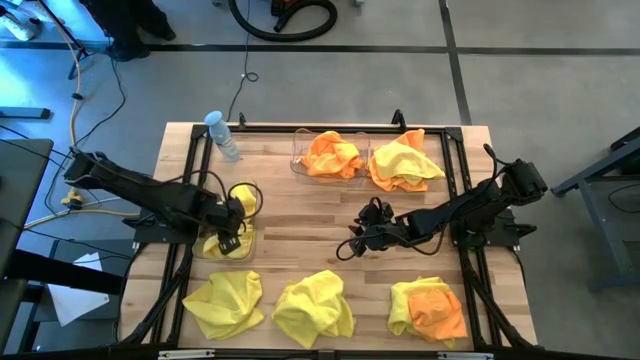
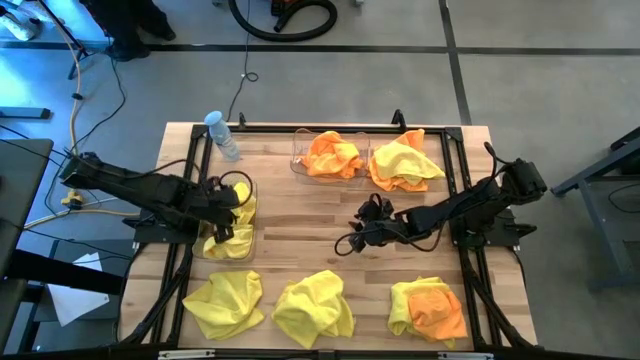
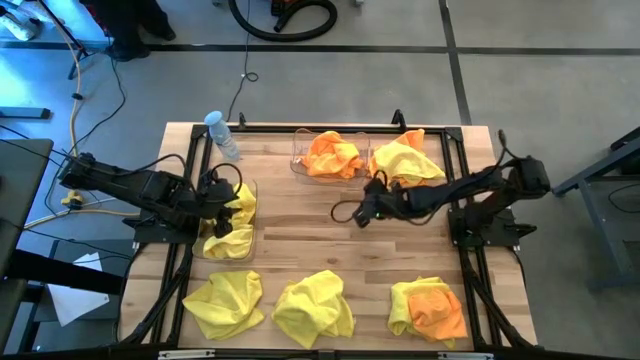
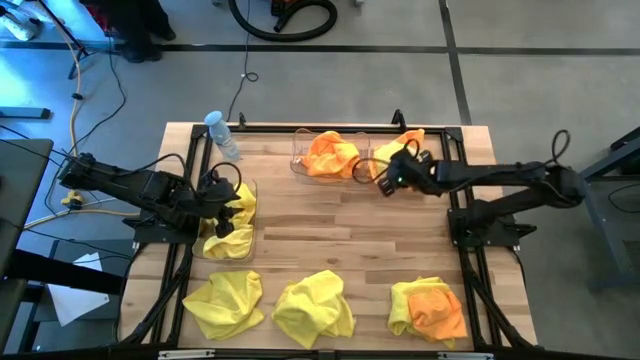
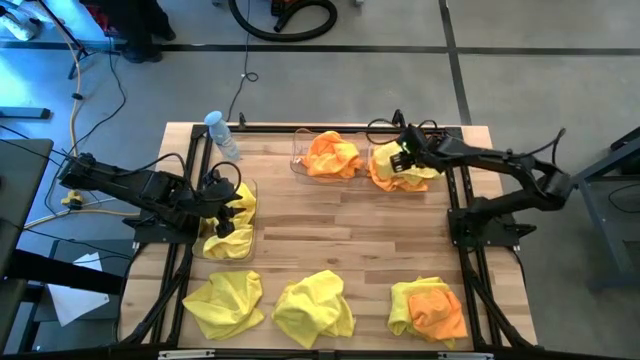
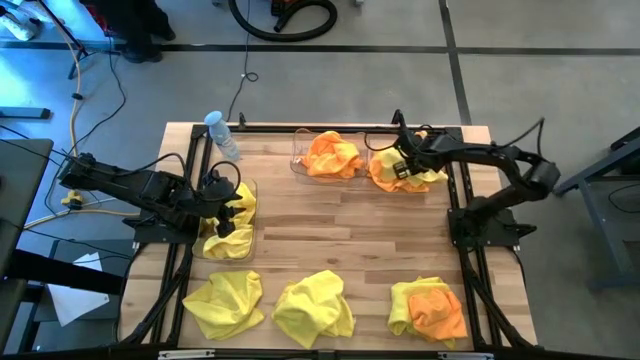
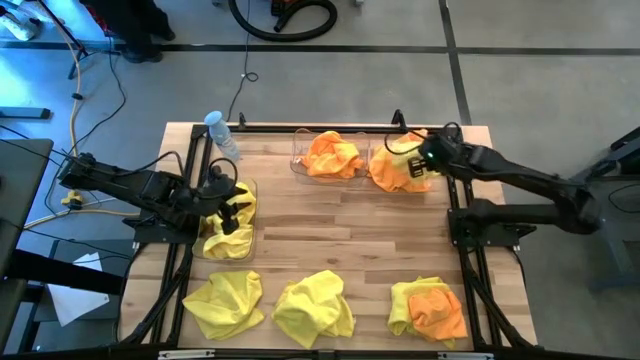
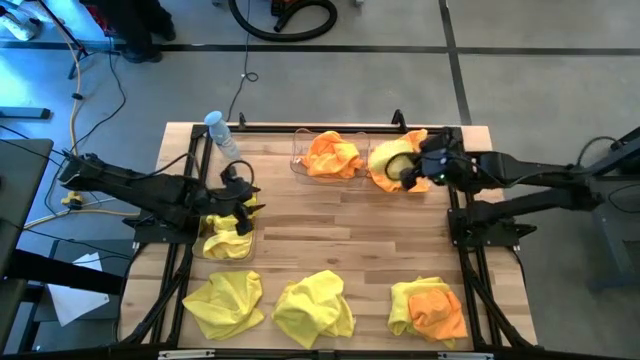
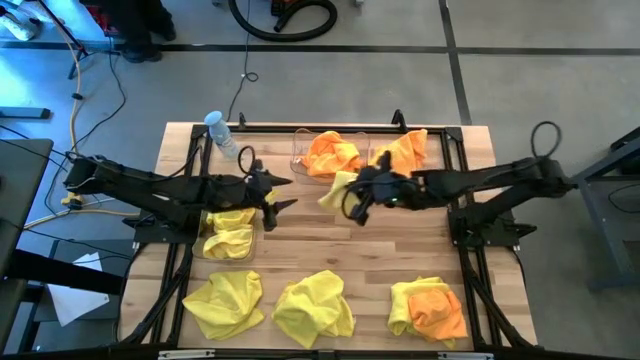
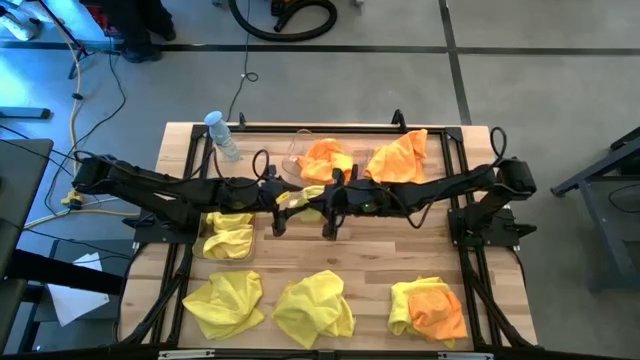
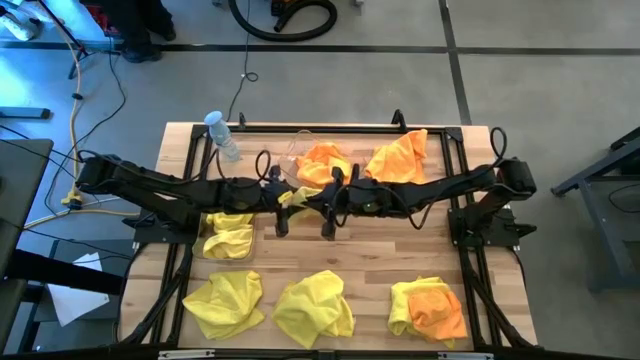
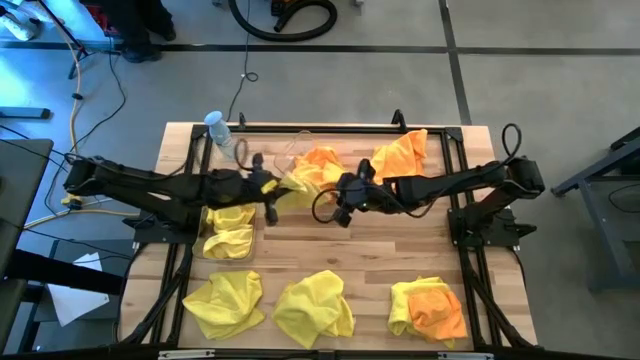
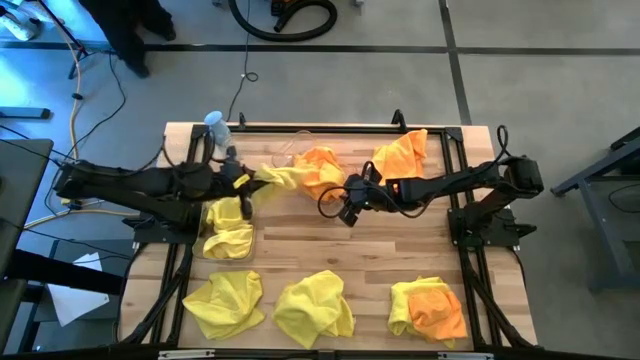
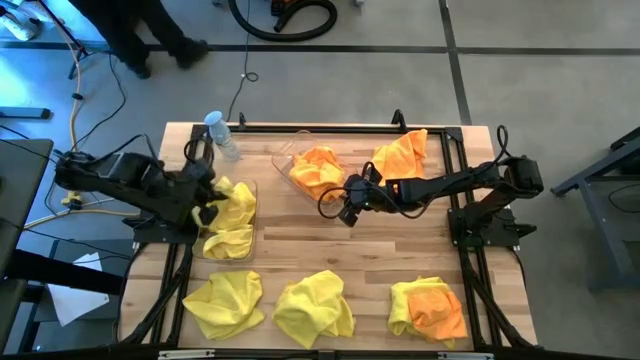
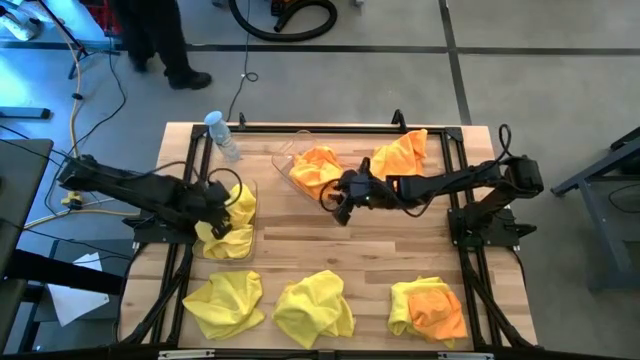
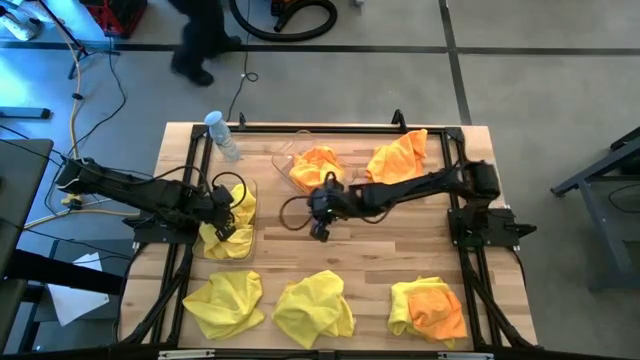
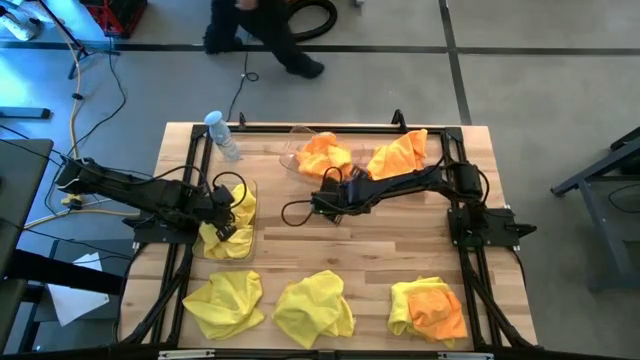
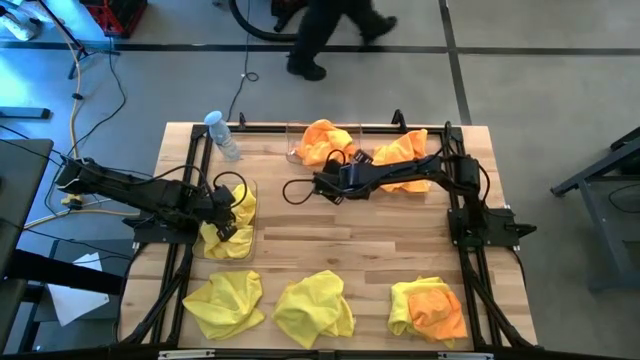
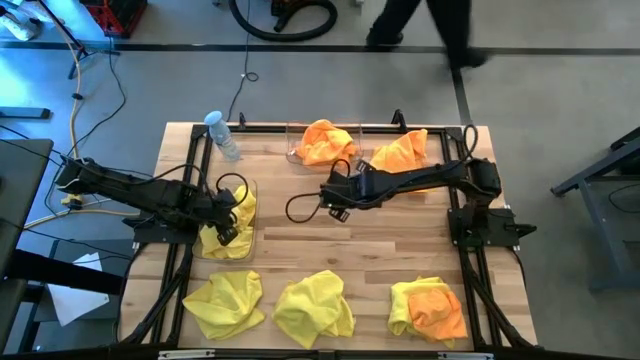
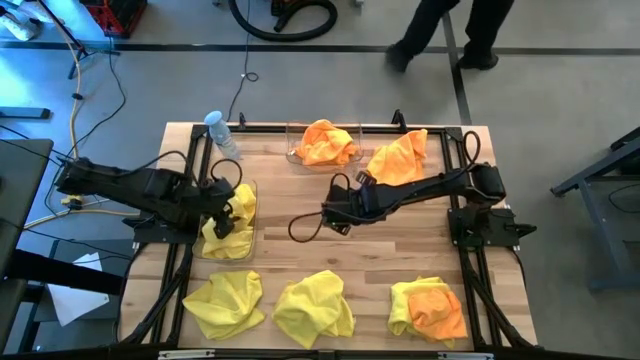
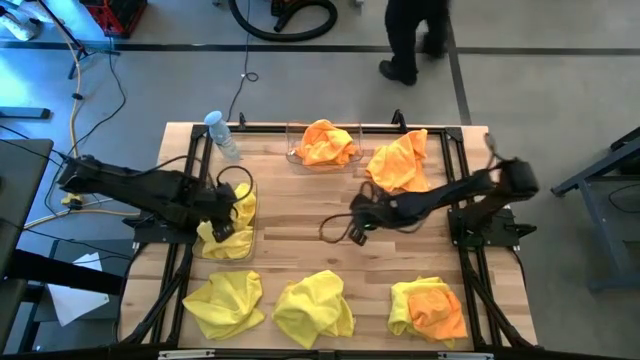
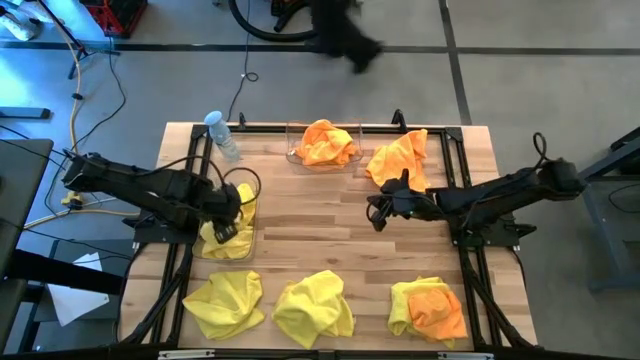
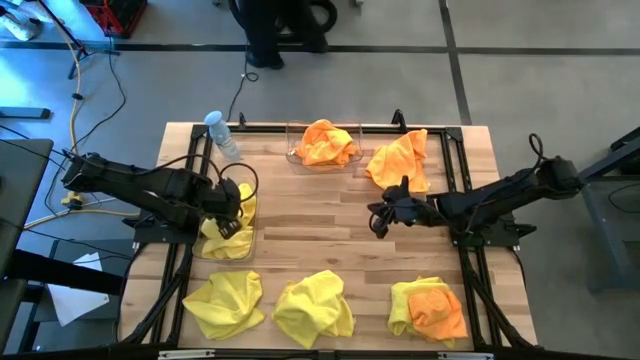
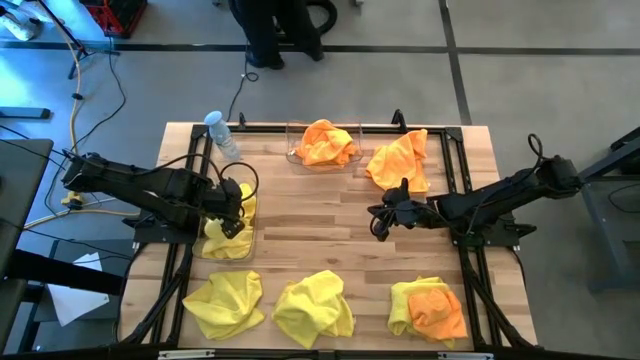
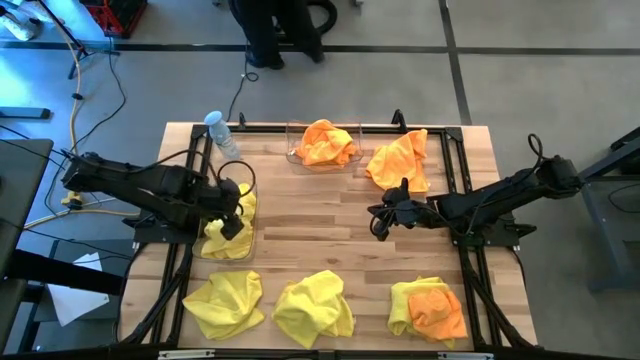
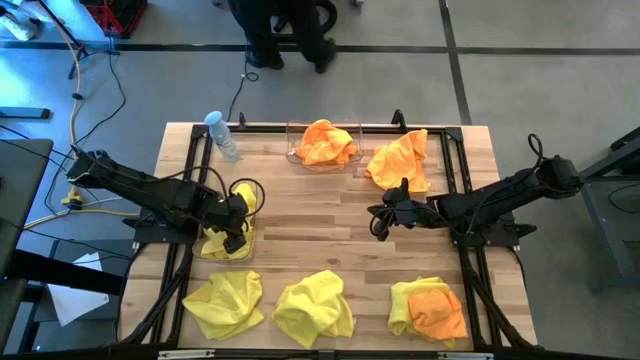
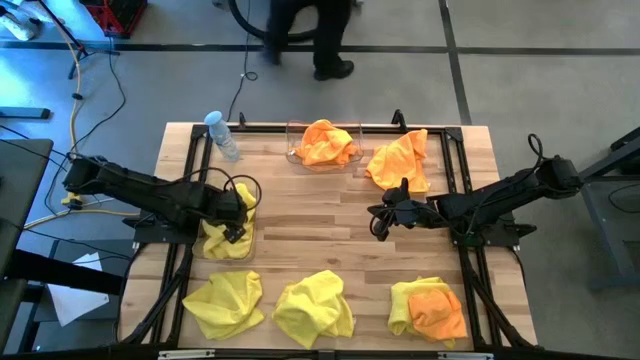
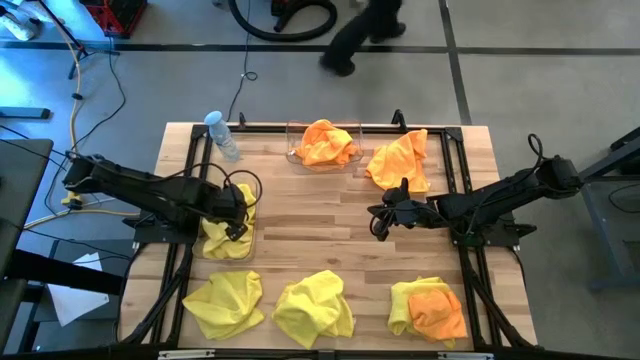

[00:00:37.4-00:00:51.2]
Task: Sort microfiber towel by color & place in baskets
Put the yellow microfiber towel into the bottom transparent bin

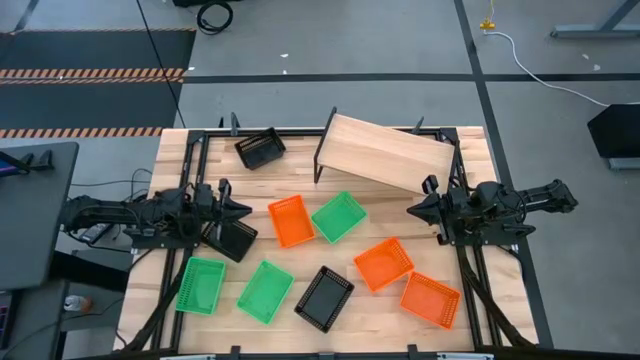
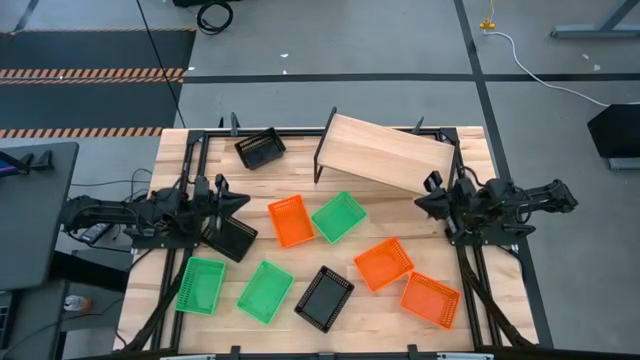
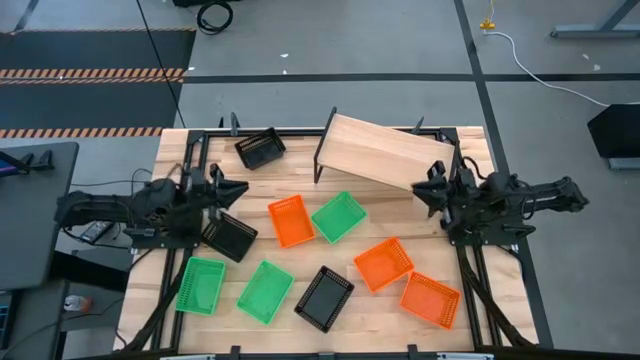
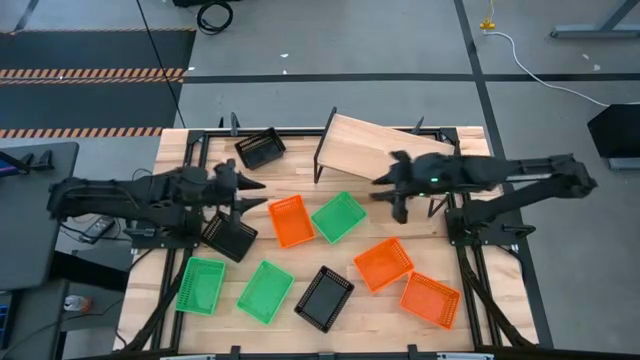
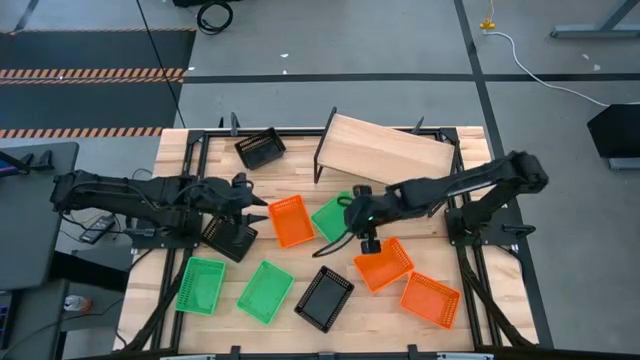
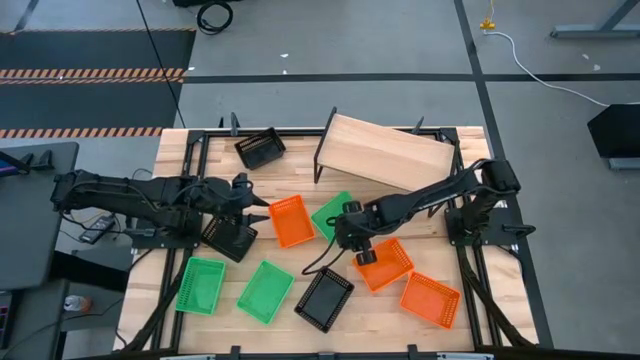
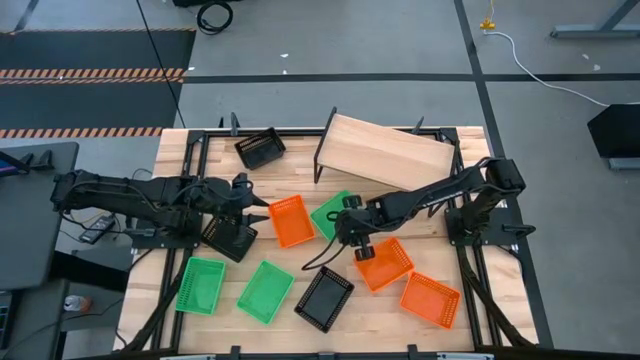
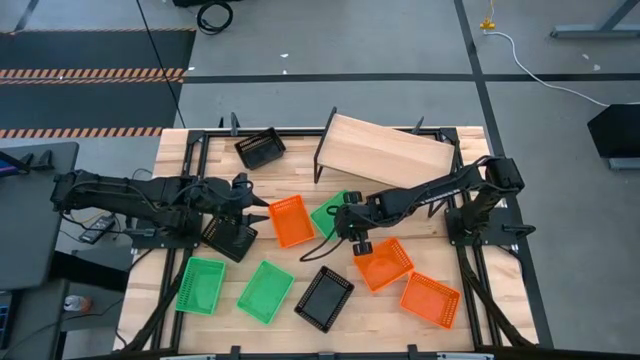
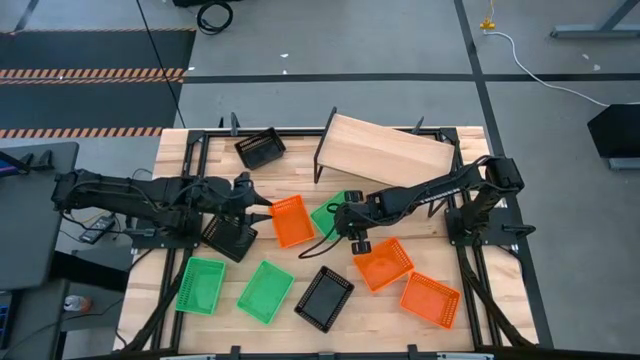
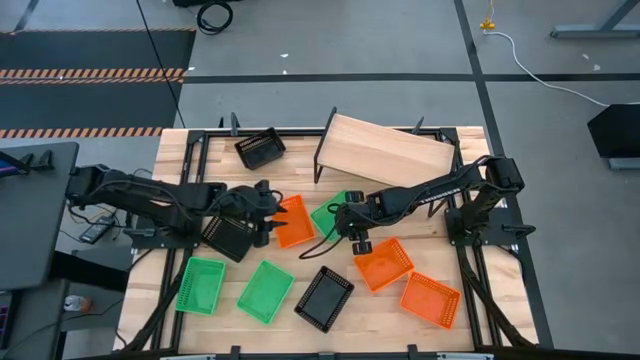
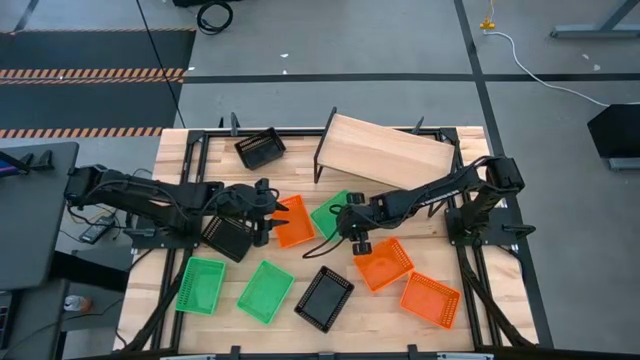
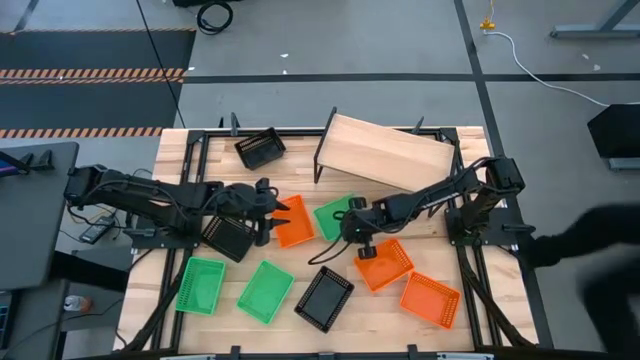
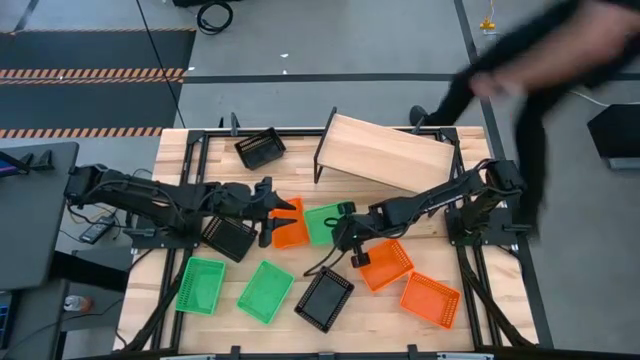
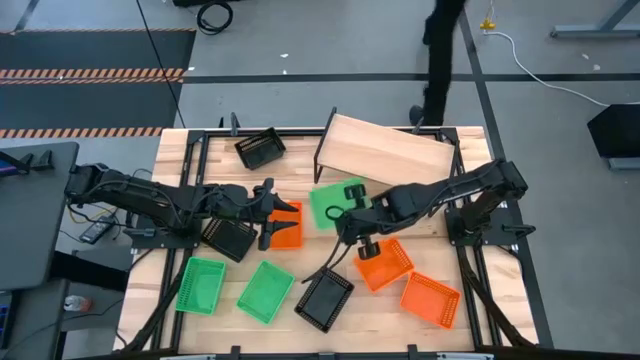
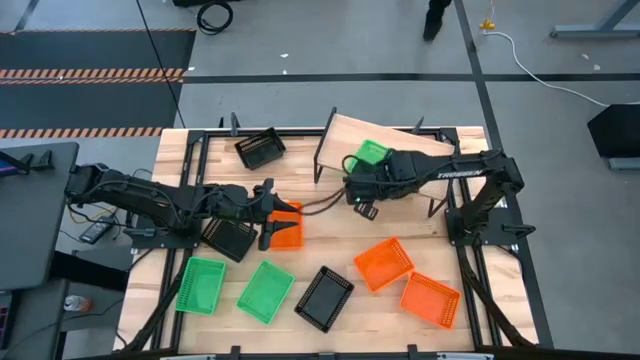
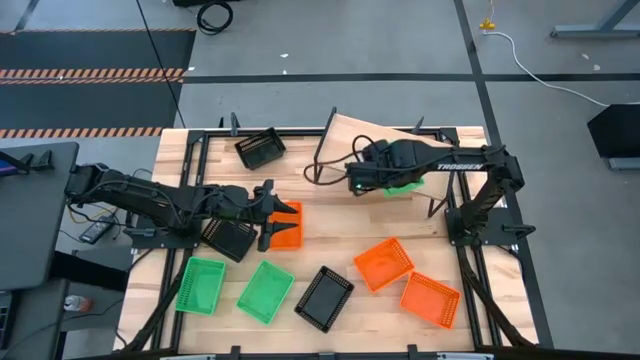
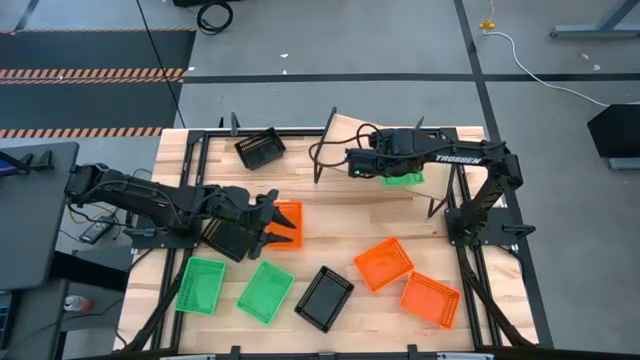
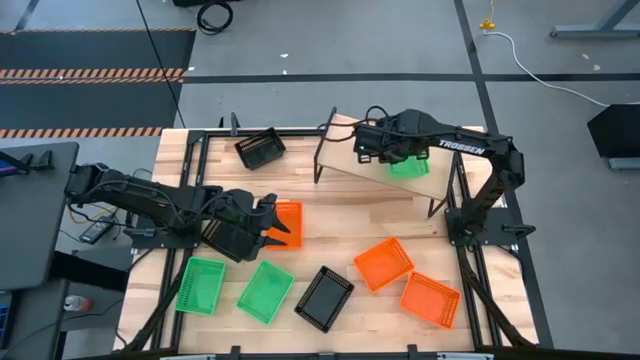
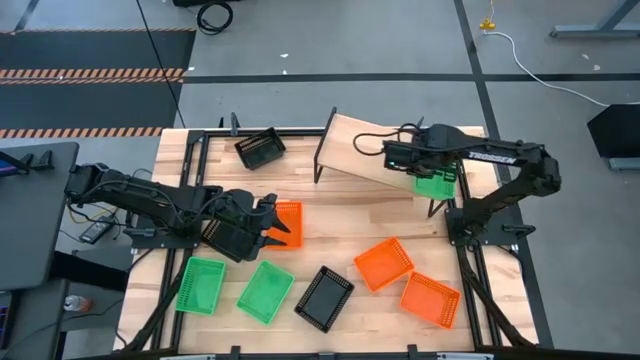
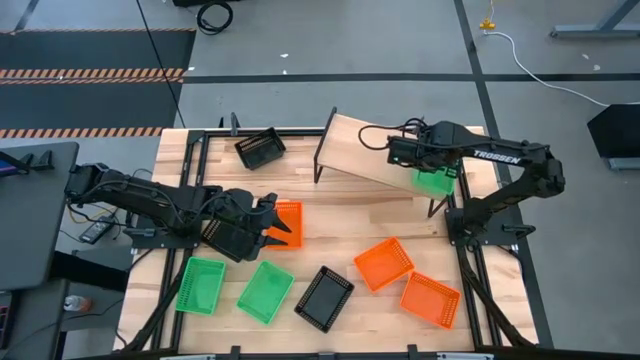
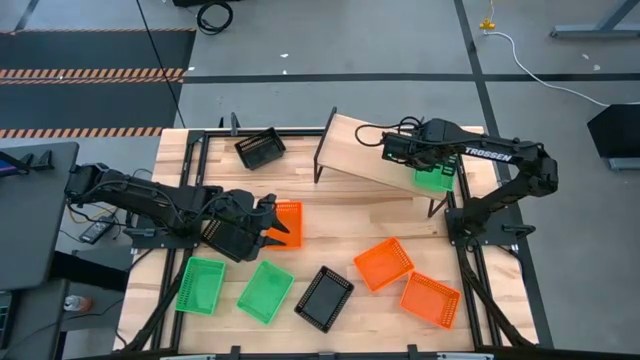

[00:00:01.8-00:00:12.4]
Task: Stack baskets on shelf by color
Put the top green bin on the shelf
